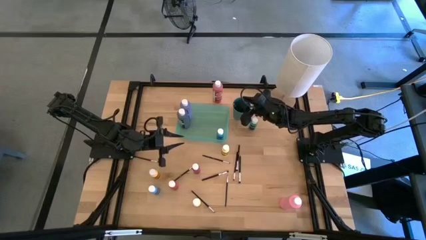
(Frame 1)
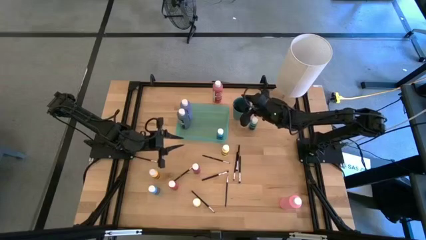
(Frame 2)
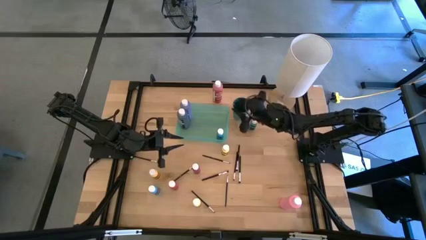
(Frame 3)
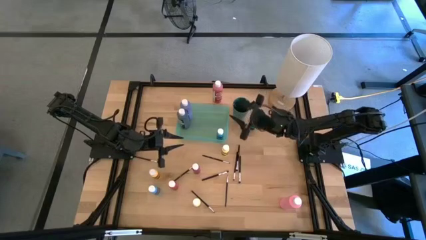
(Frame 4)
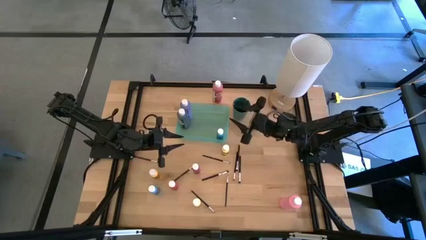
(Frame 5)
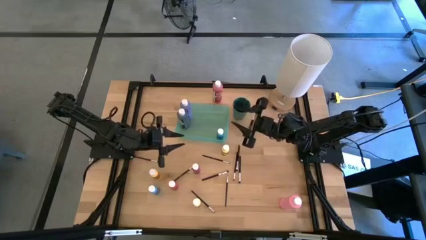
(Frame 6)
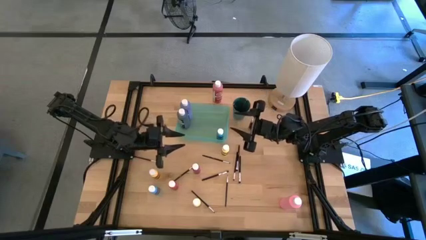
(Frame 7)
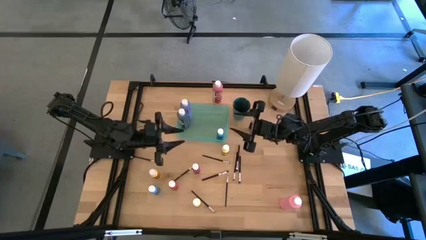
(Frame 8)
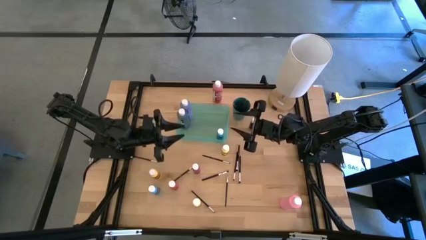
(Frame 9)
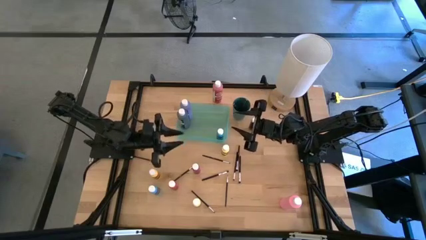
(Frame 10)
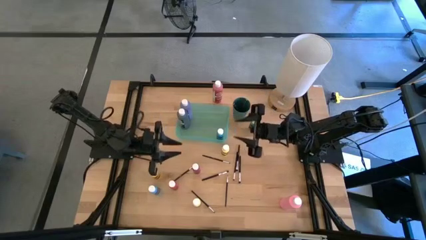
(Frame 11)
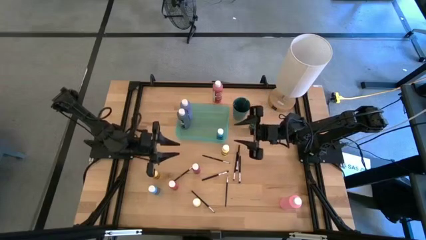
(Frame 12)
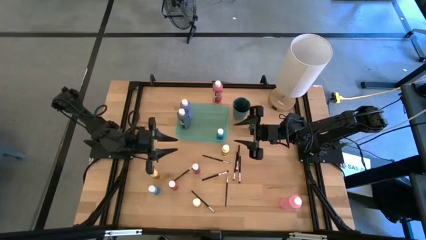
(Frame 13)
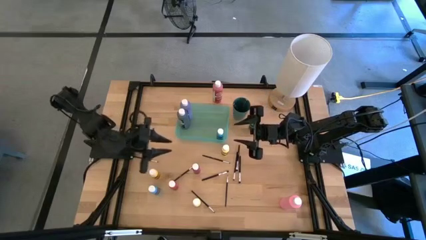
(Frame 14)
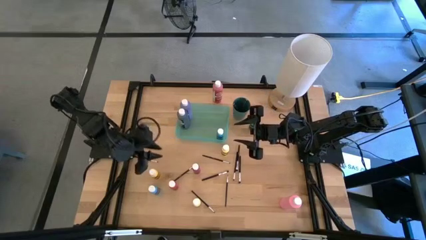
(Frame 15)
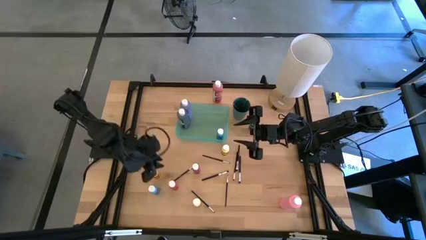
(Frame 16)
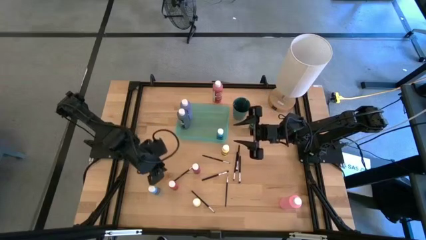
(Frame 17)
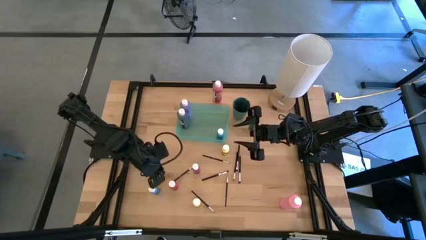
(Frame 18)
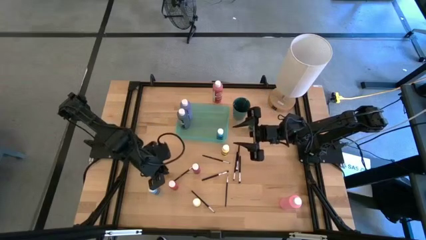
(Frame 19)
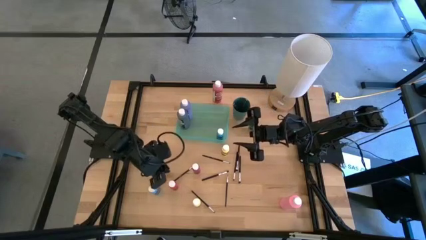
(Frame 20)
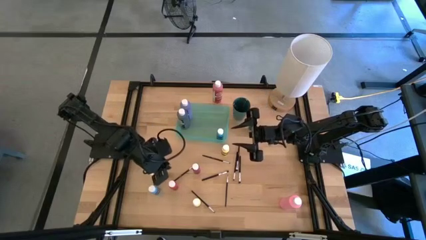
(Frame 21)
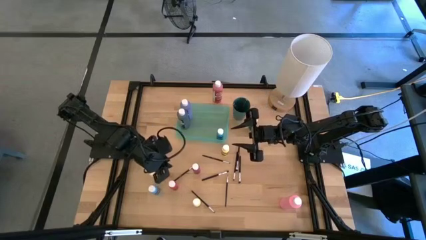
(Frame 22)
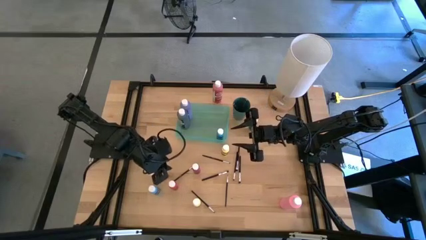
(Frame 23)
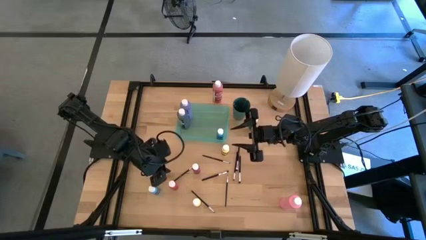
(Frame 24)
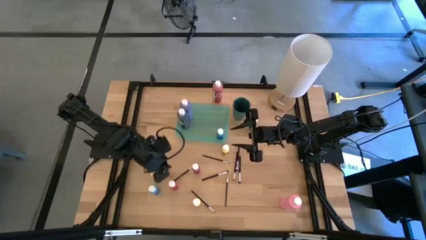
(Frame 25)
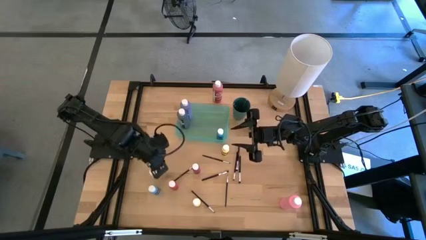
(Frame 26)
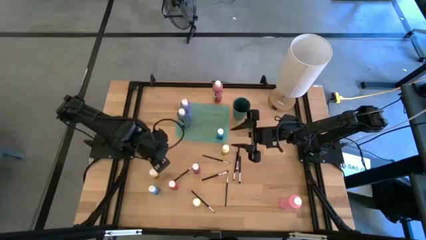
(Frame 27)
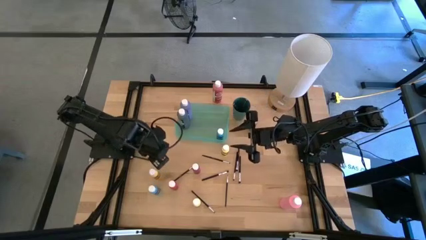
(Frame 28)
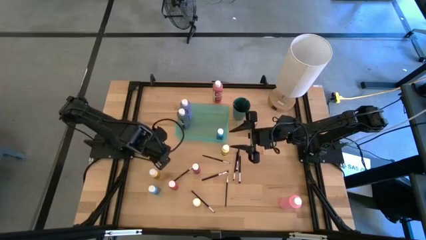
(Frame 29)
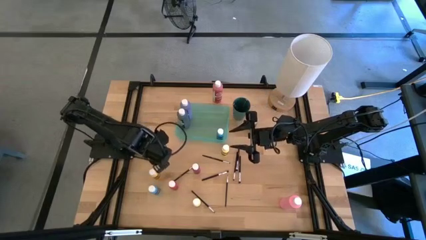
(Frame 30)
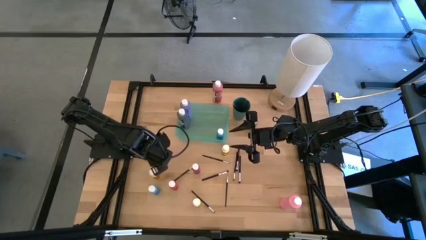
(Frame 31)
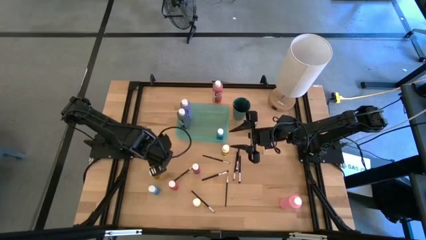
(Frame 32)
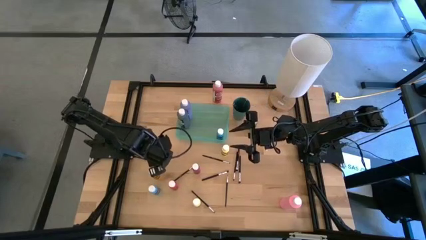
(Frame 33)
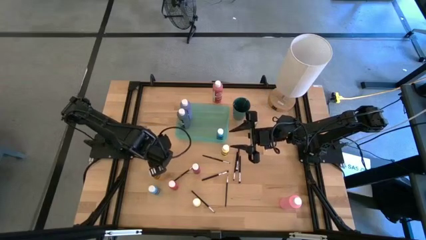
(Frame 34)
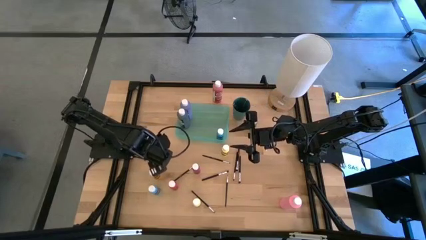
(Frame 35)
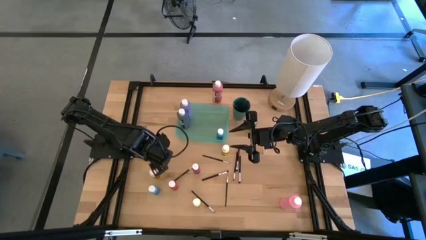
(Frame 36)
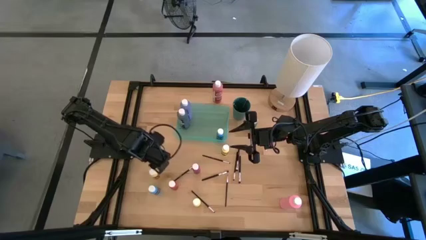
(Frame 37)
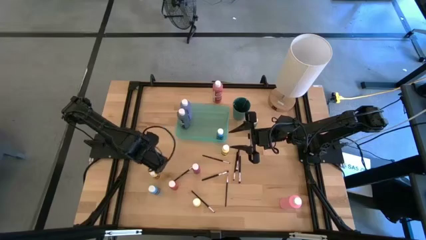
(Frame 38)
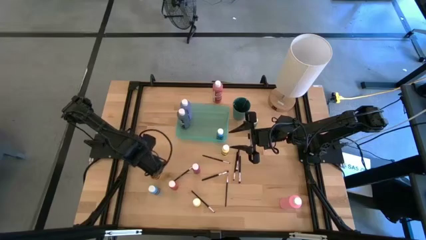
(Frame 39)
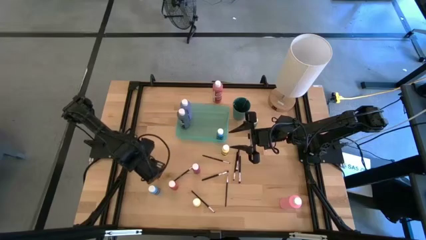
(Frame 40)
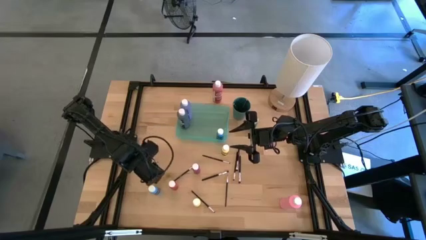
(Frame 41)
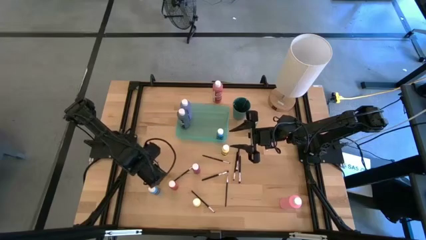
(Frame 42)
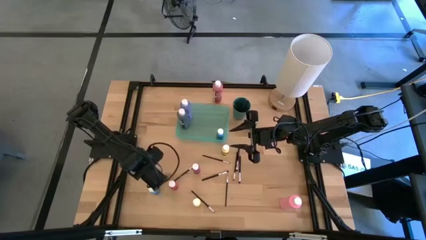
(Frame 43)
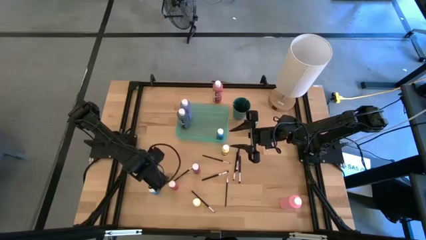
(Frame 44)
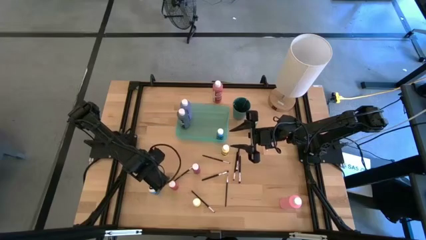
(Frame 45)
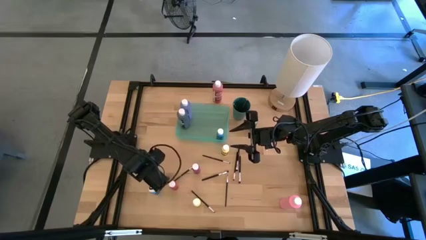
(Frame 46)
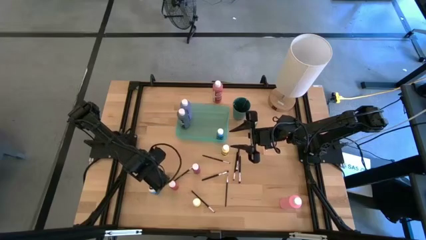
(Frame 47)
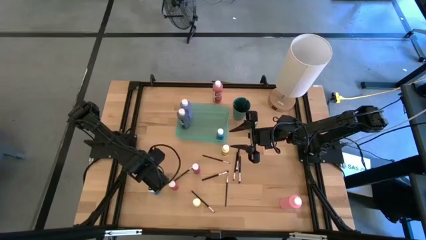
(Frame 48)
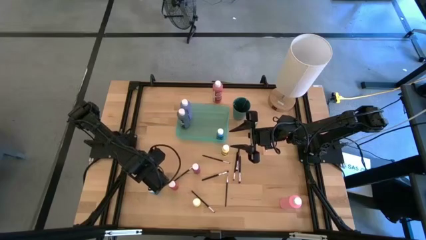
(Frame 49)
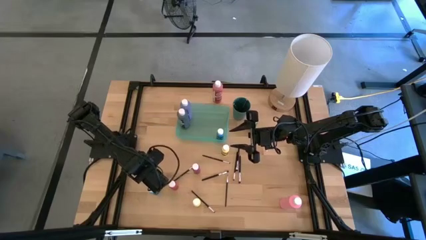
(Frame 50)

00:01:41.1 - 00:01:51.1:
Task: Pick & Place Paint Supplies
Put the left small yellow paint bottle into the green bin

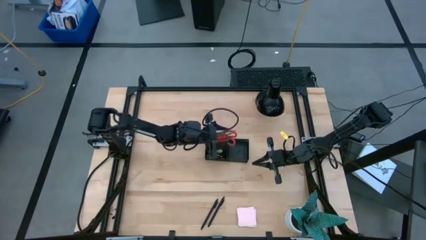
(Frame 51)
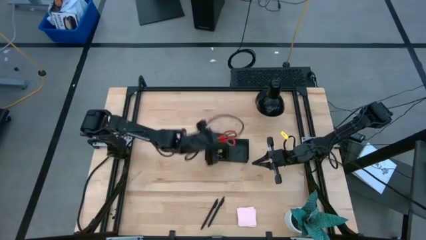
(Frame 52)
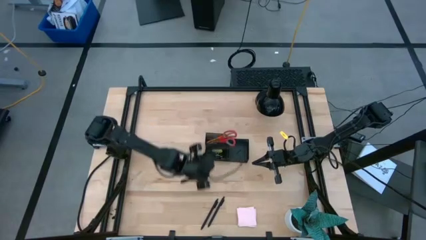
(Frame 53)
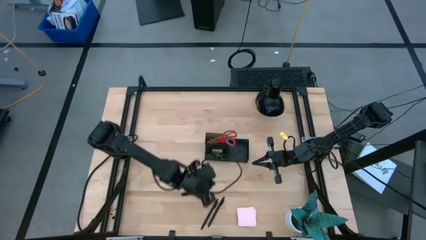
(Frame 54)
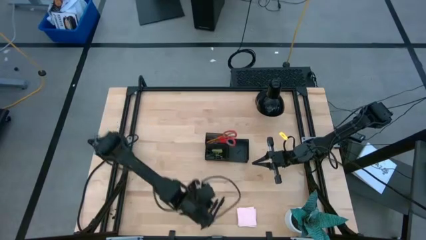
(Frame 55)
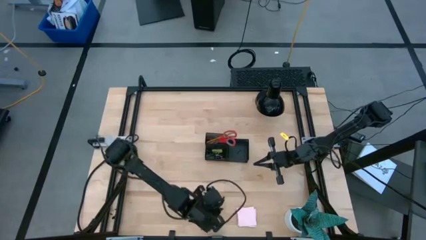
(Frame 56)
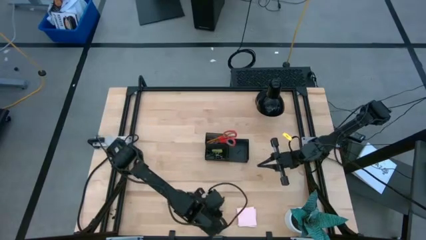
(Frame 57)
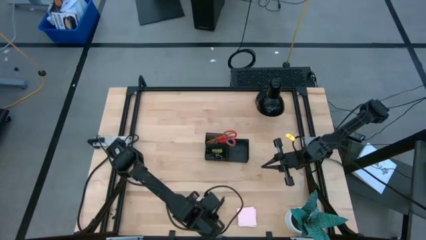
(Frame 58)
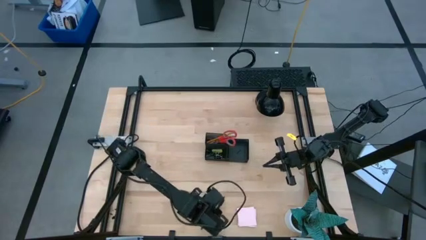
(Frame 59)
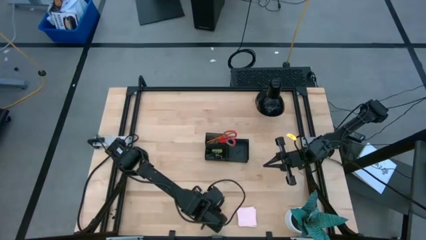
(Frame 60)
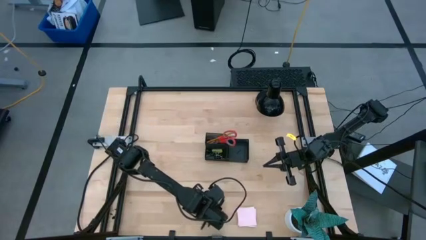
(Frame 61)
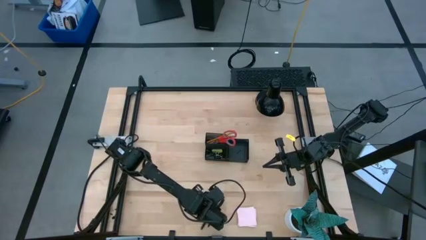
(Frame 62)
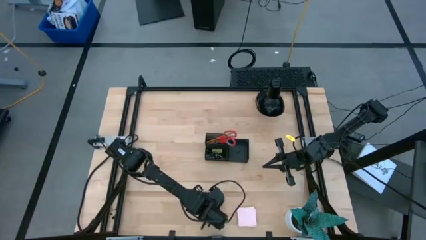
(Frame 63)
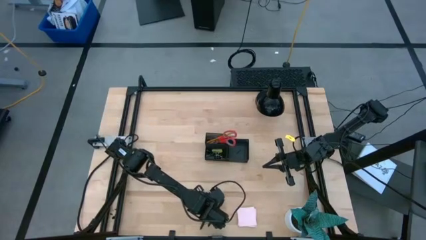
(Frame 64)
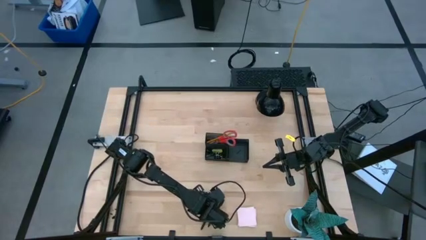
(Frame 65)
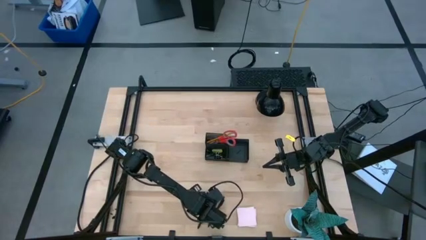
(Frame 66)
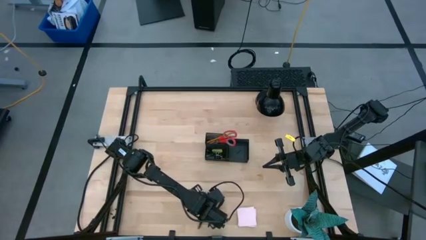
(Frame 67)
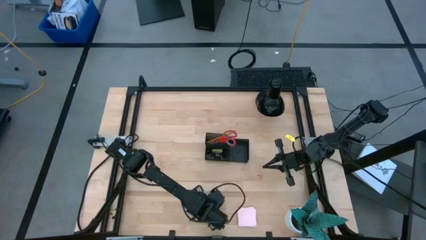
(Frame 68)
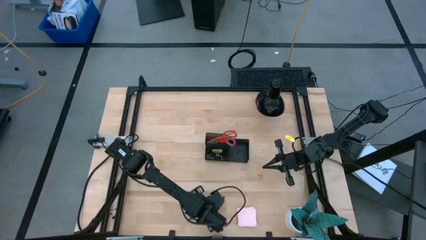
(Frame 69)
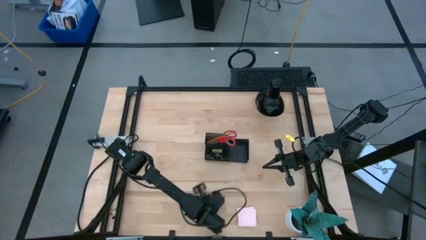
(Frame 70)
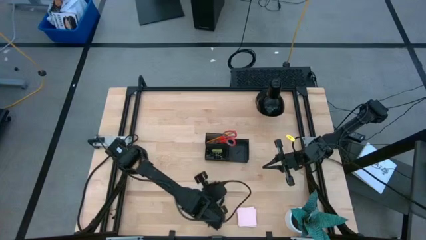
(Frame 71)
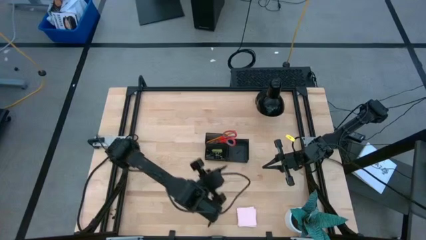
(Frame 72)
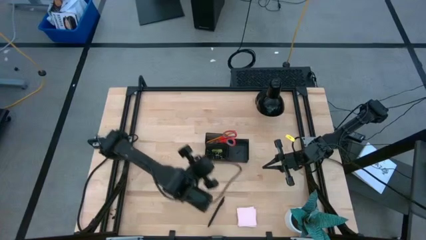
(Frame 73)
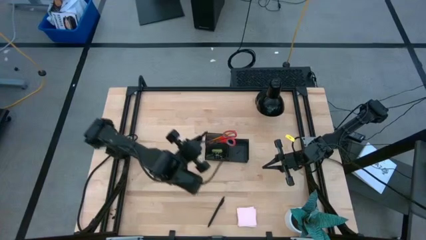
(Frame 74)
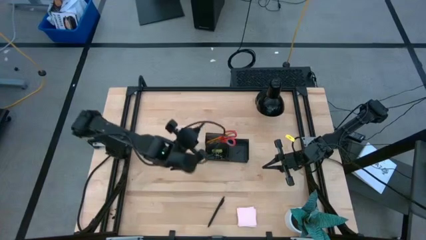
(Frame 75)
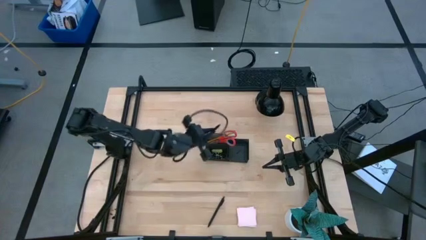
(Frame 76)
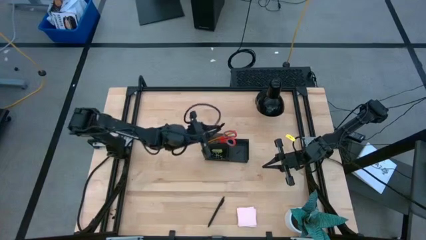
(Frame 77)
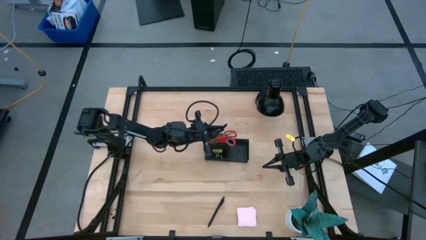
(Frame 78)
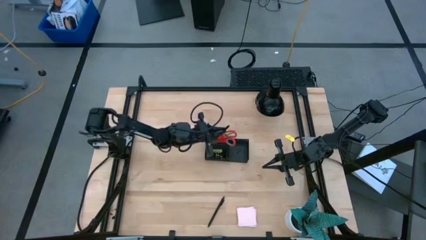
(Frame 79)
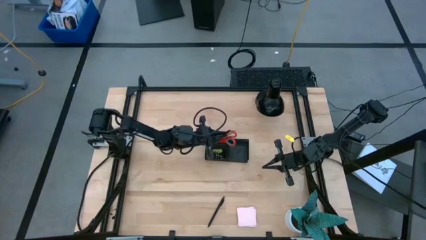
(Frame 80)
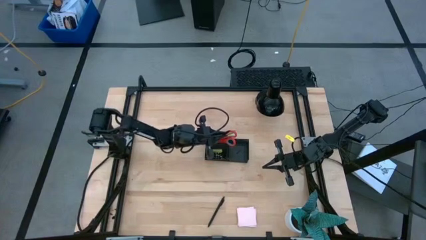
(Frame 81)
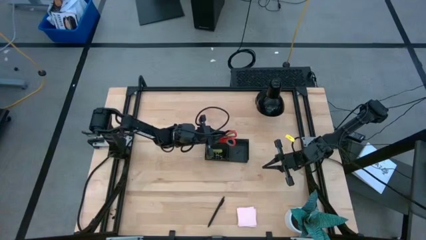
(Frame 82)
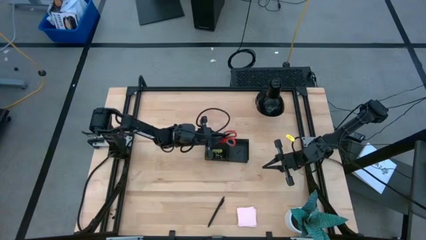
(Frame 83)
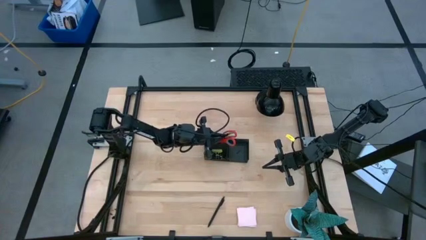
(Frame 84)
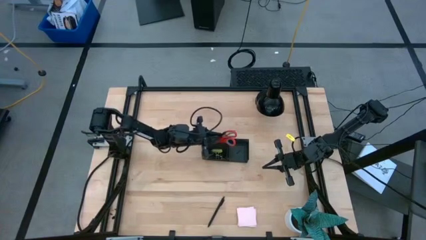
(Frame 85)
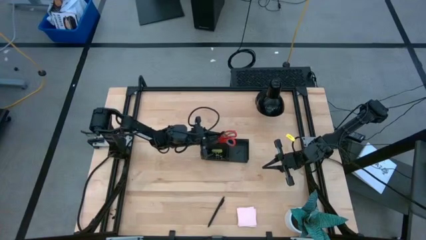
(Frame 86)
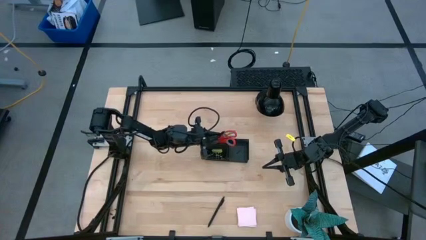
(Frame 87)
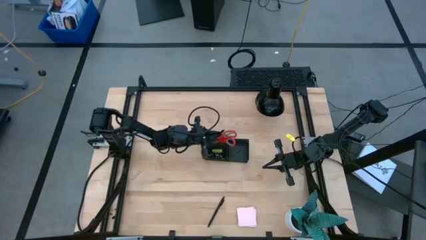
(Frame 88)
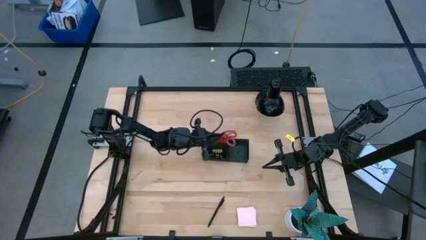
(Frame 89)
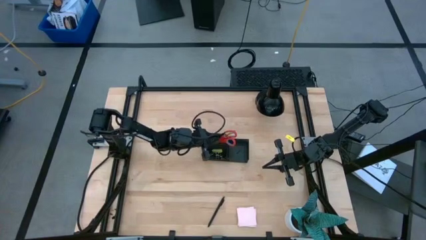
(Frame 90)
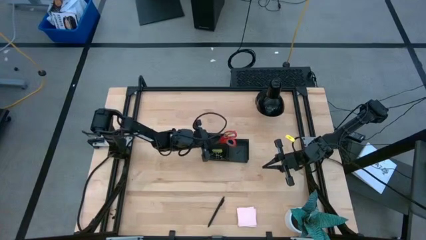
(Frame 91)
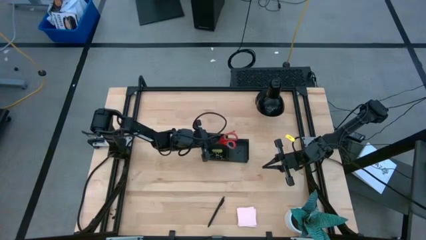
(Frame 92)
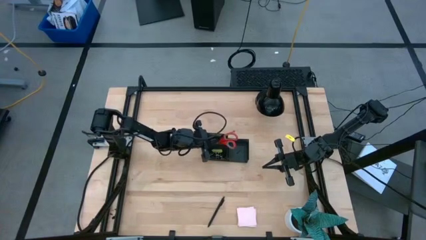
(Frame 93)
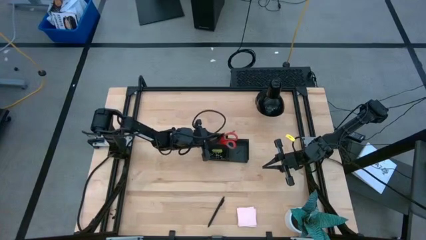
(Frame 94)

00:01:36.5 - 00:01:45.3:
Task: Pick and place office supplies into organizer
Put the black pen into the black desk organizer
